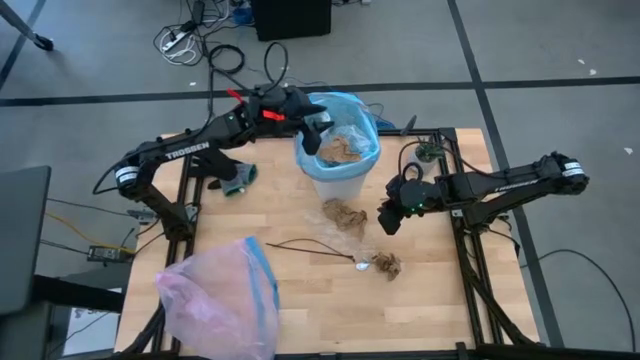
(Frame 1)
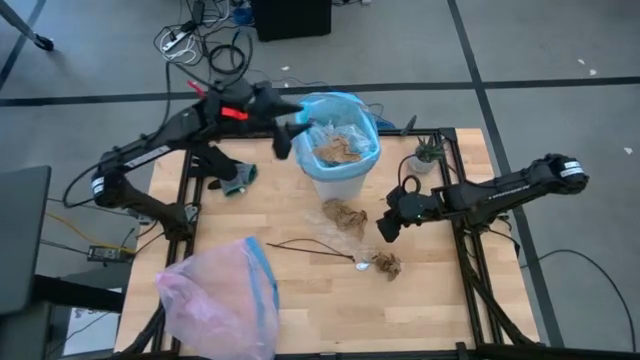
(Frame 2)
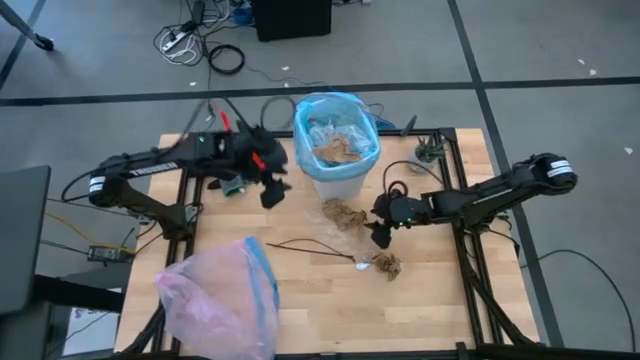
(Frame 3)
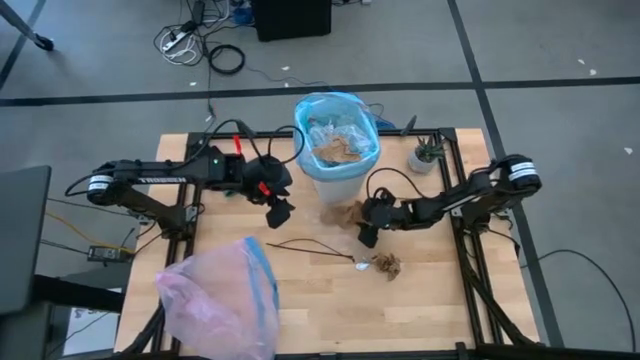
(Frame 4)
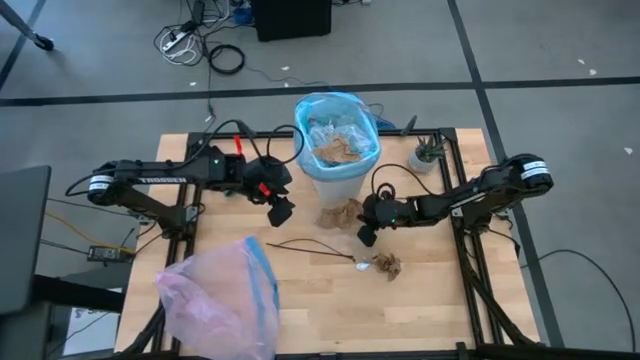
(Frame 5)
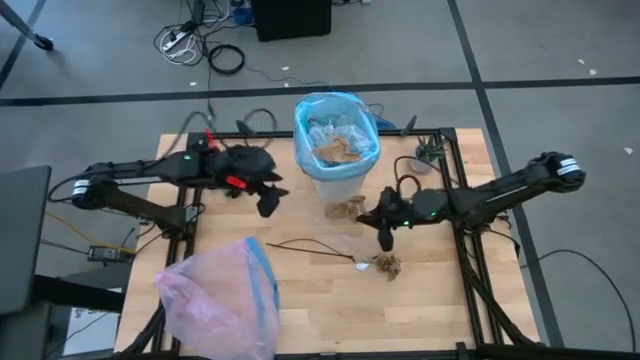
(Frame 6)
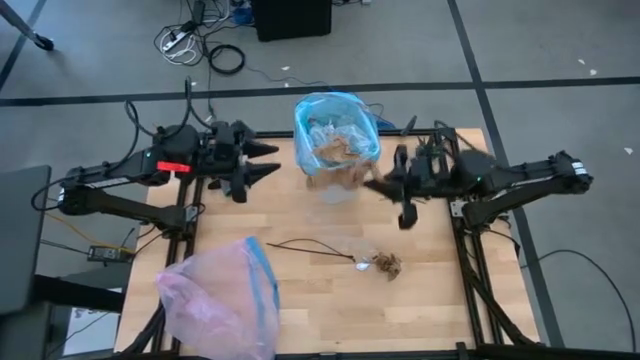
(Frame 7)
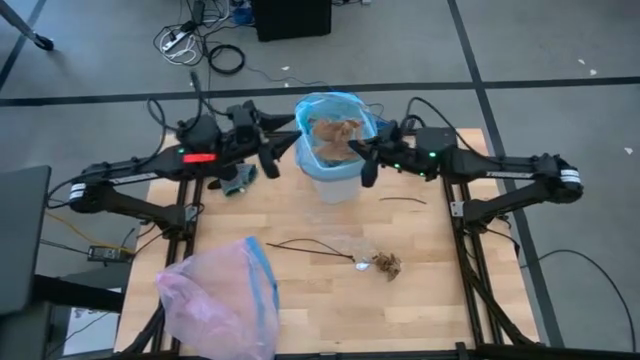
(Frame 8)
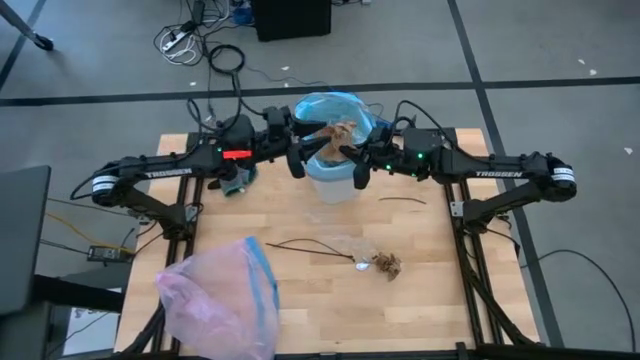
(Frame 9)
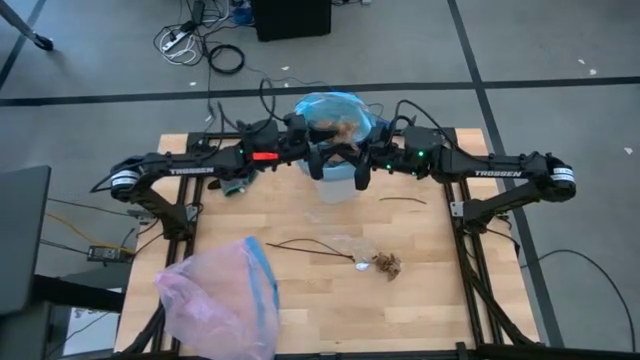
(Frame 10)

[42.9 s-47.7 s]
Task: place trash/remove bag and relplace
Put the brown paper into the trash bin

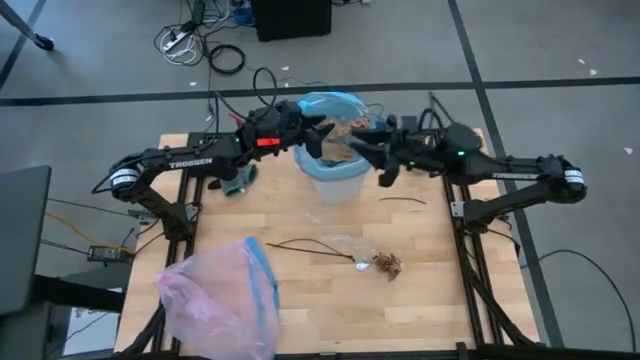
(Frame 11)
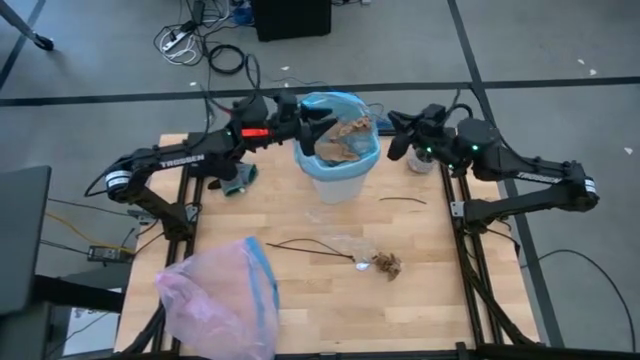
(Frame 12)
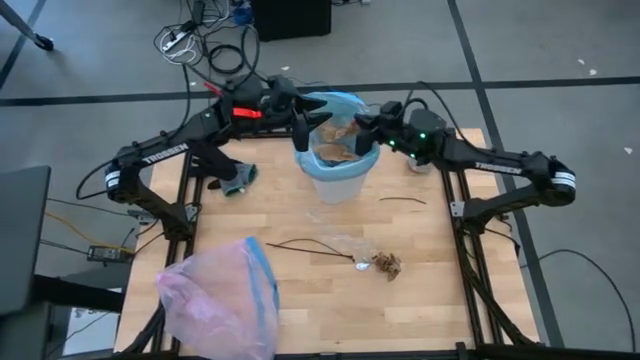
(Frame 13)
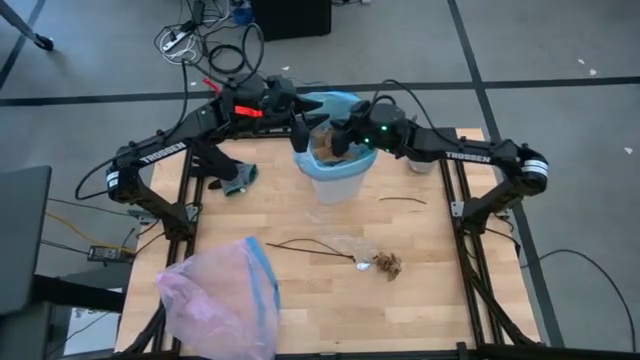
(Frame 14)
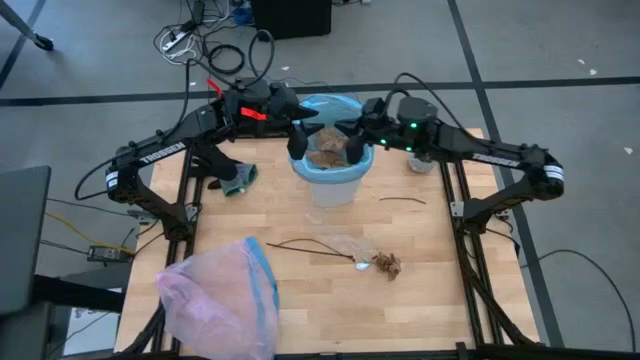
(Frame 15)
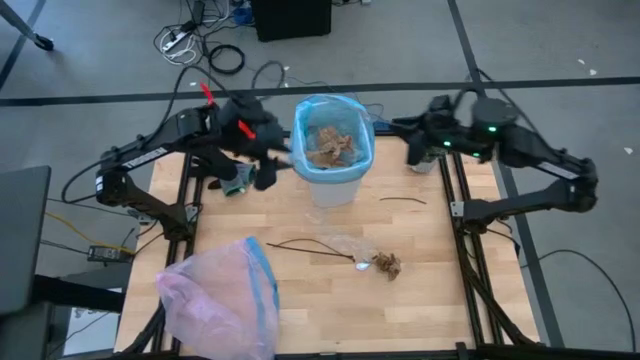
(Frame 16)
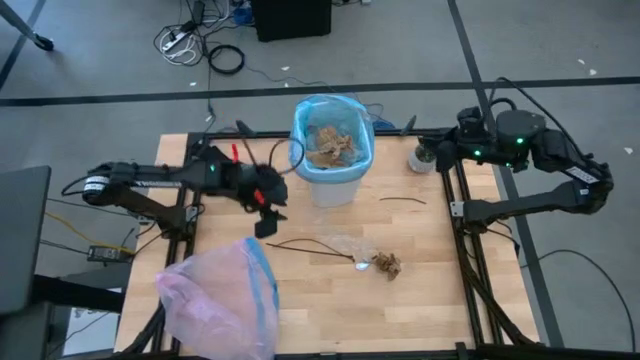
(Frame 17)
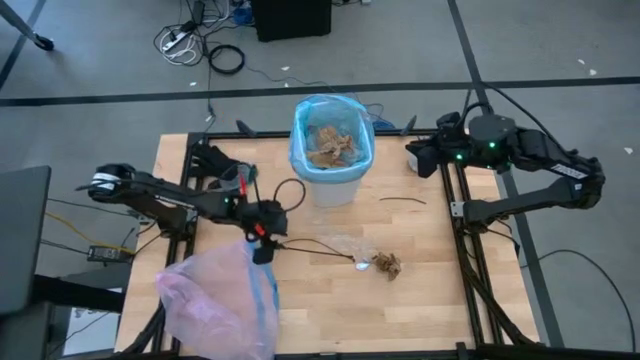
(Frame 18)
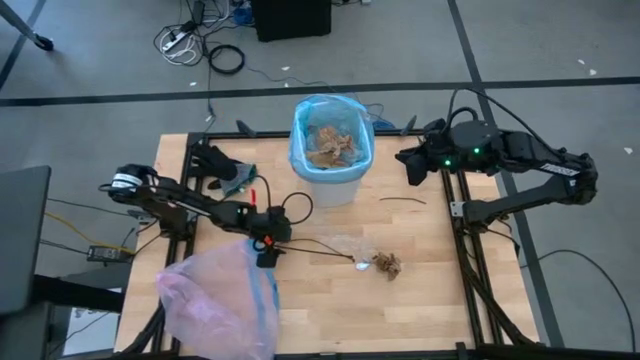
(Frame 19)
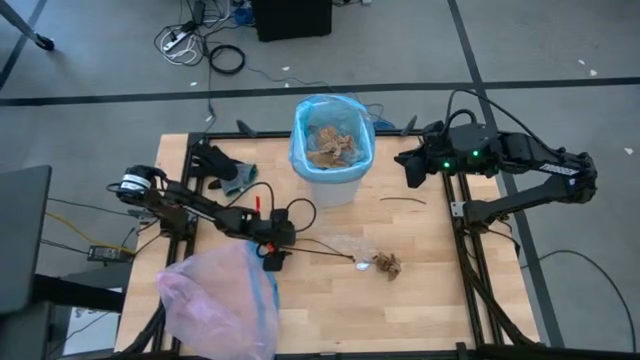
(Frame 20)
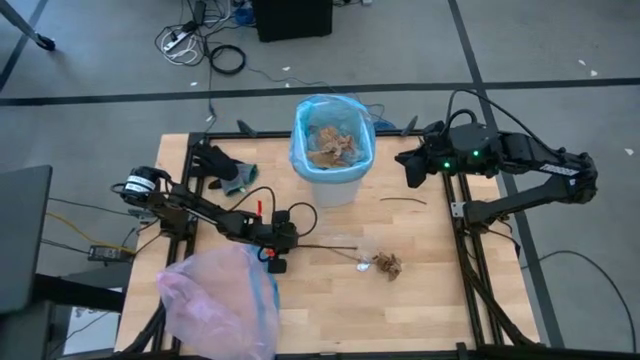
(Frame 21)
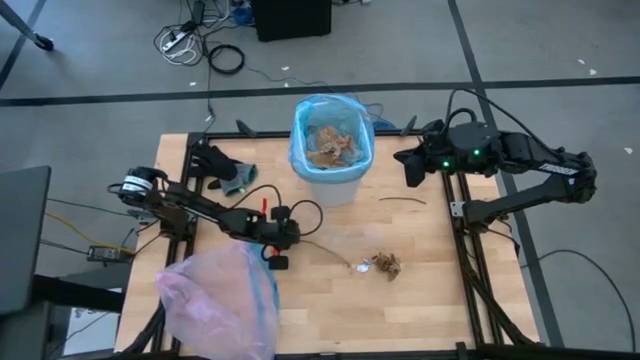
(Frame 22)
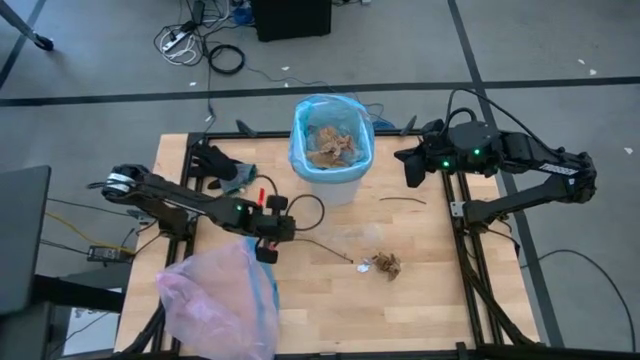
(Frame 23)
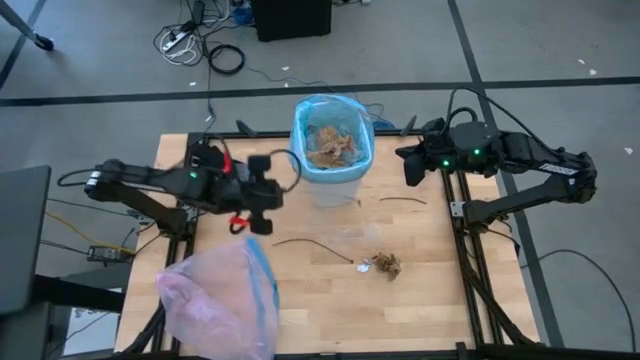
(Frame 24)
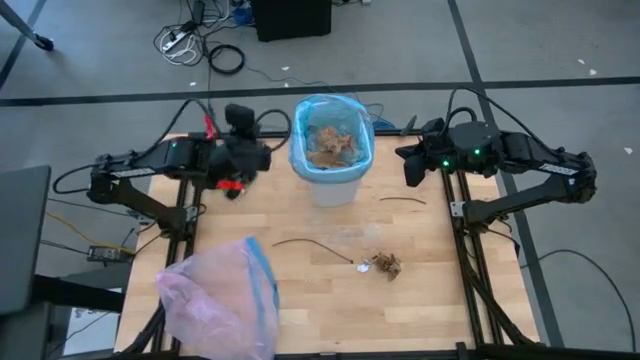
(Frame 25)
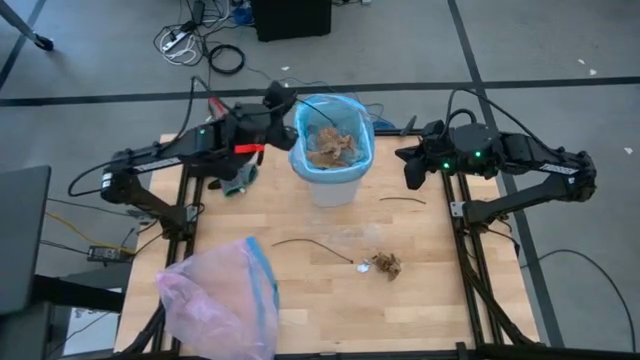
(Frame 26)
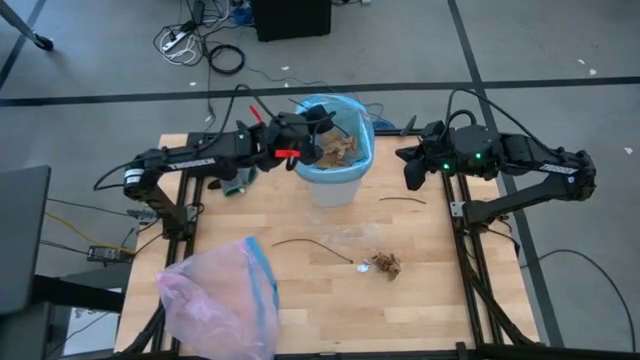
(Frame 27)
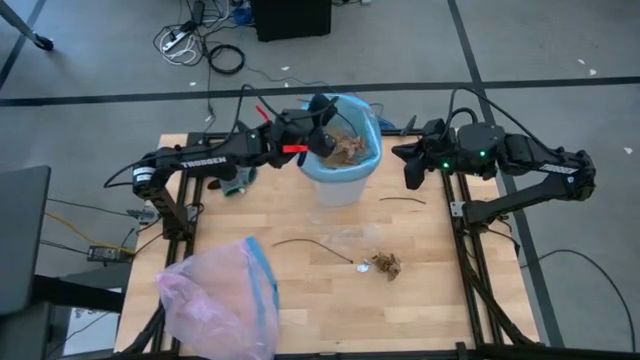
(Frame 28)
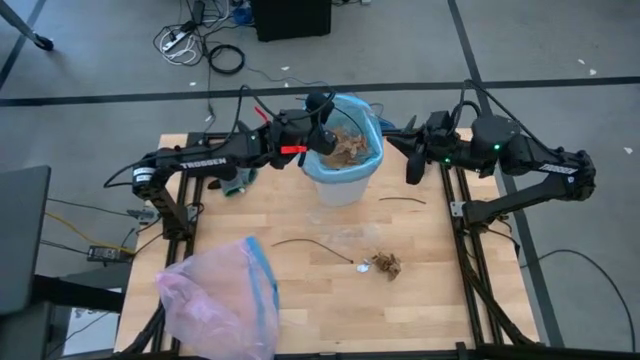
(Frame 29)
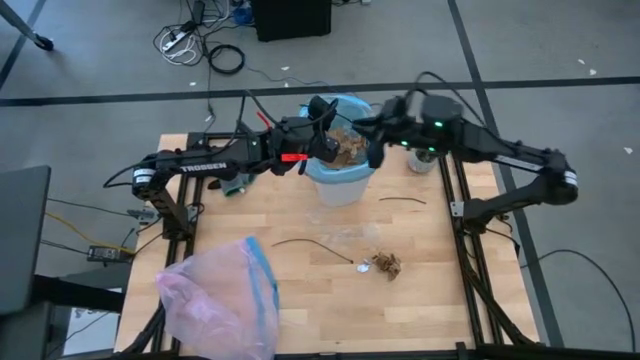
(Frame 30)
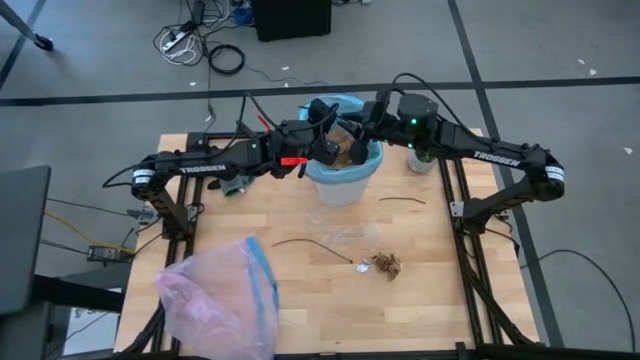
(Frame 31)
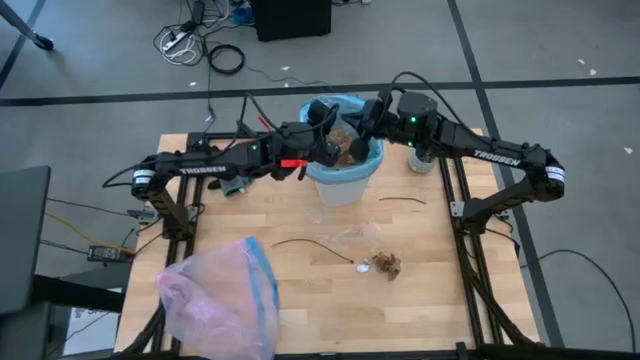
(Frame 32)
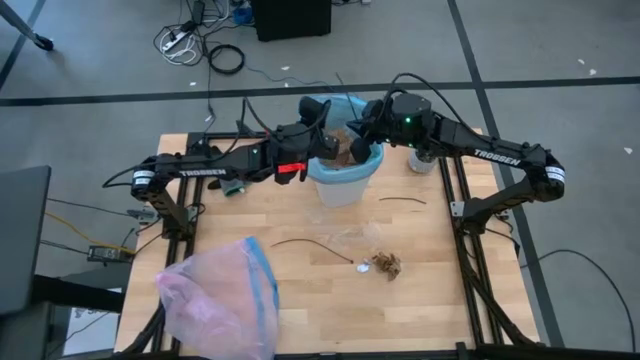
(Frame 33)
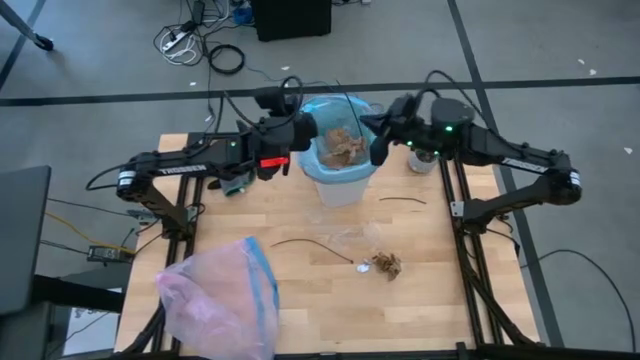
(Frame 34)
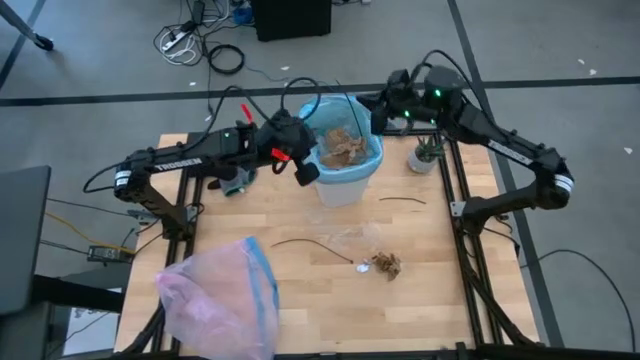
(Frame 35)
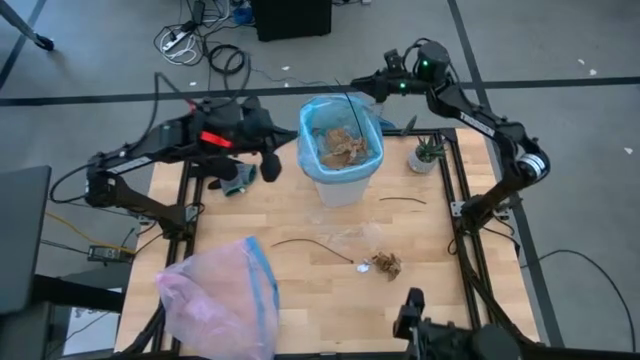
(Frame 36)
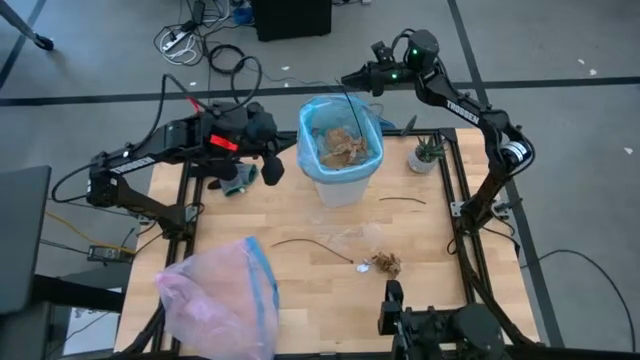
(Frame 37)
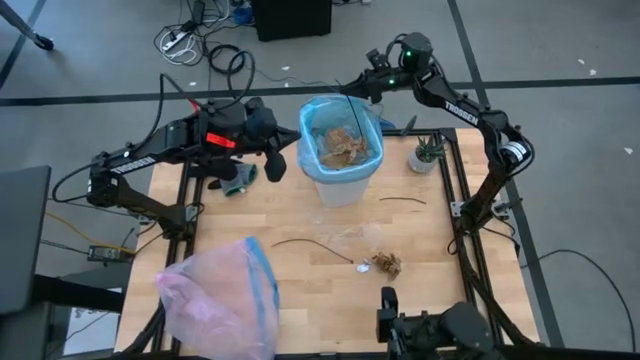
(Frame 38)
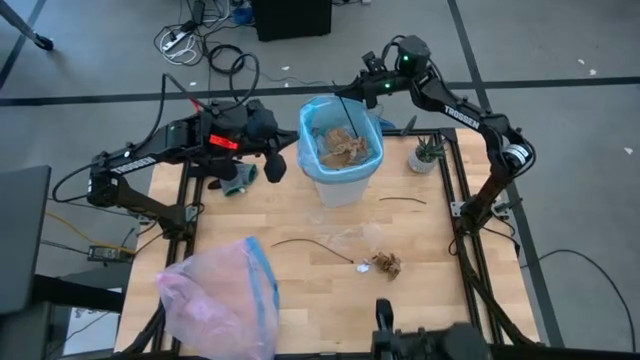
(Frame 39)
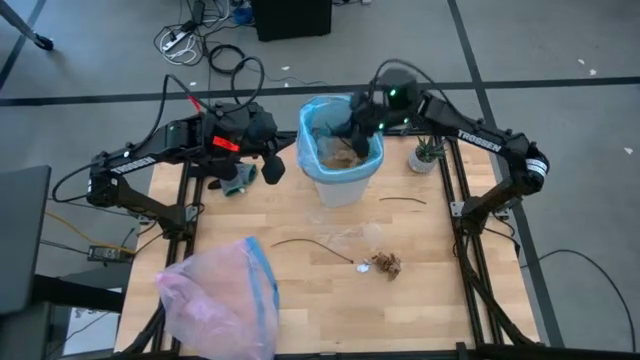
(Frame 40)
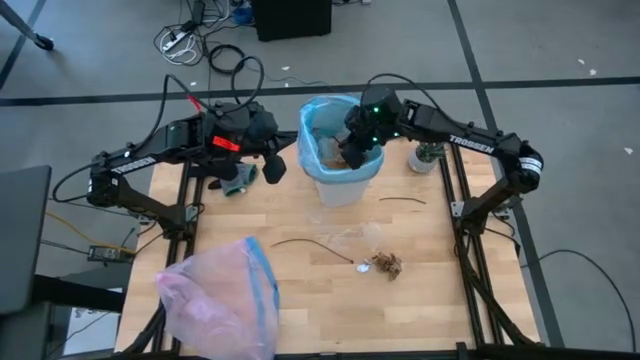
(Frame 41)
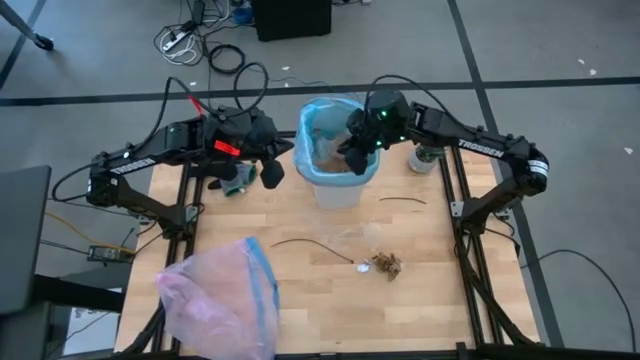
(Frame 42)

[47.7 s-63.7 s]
Put the cable tie into the trash bin

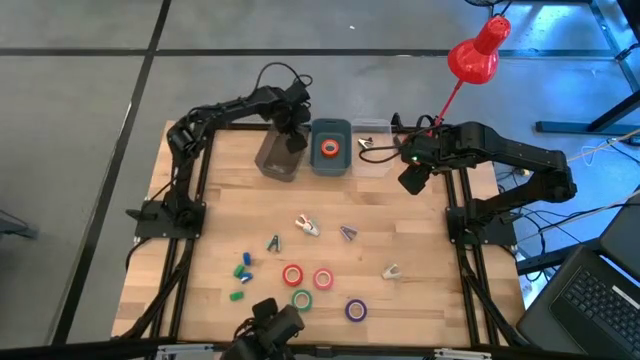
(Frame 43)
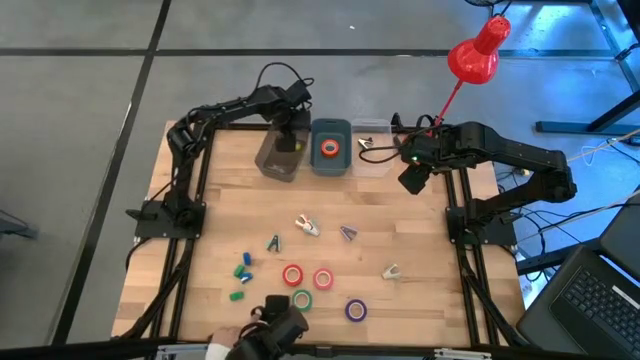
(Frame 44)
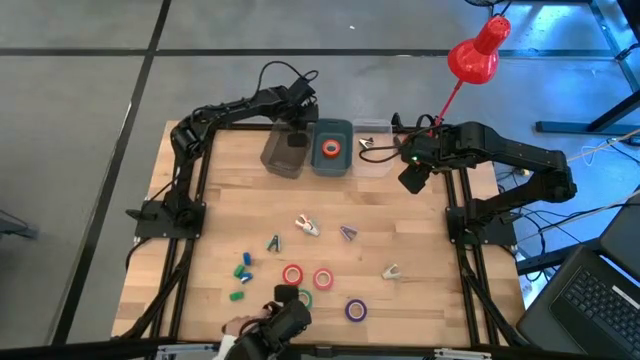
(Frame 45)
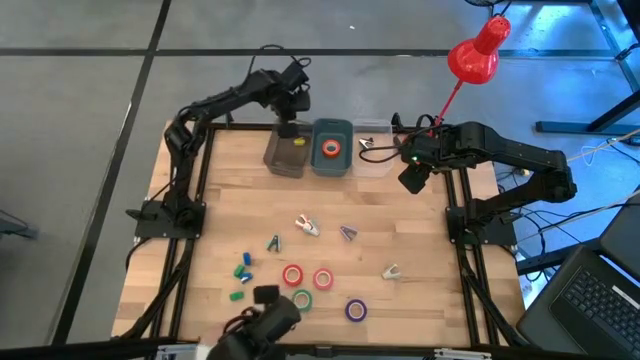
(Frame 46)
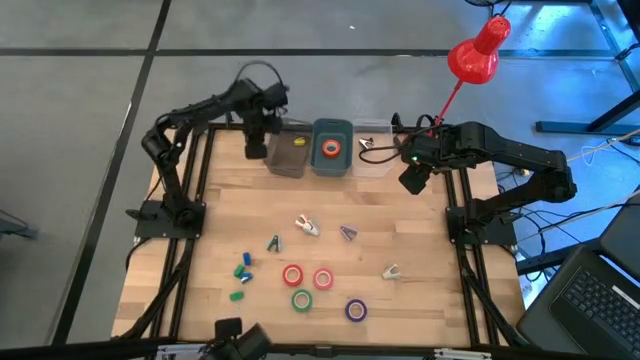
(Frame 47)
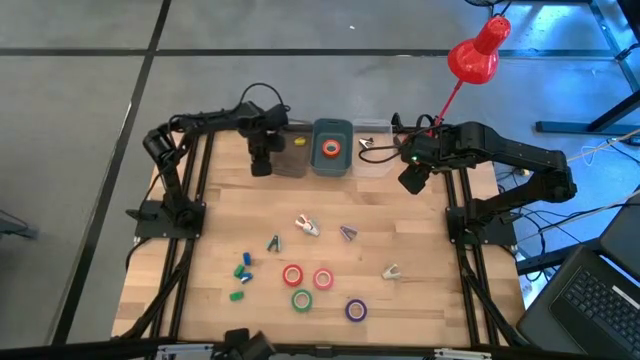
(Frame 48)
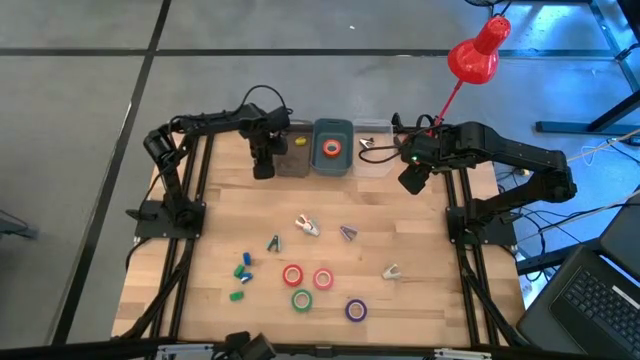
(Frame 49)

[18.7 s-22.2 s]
Task: Pick and place Stapler, Stapler remover, tape
Adjust the black bin
